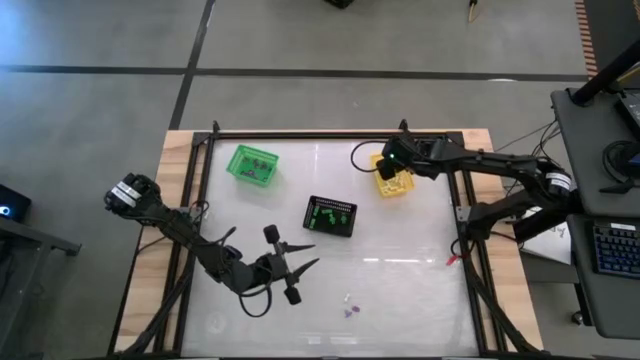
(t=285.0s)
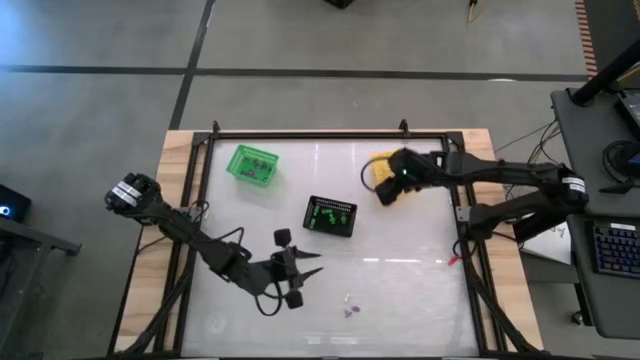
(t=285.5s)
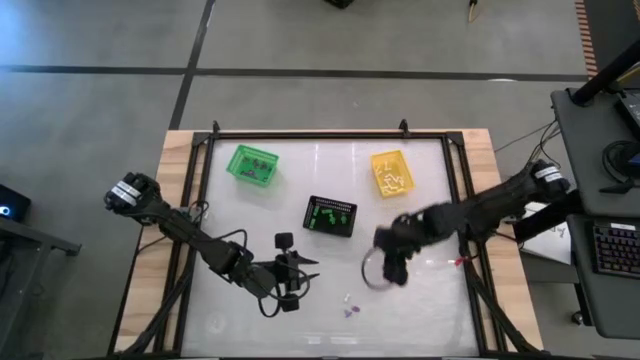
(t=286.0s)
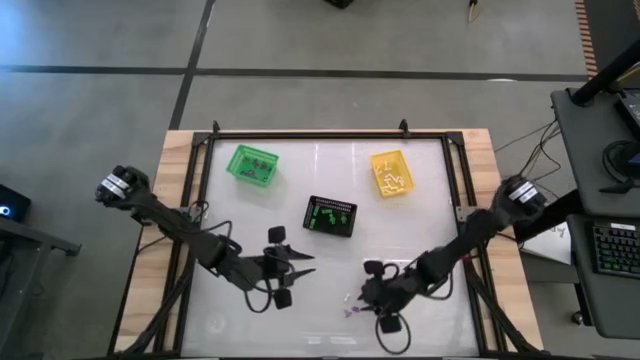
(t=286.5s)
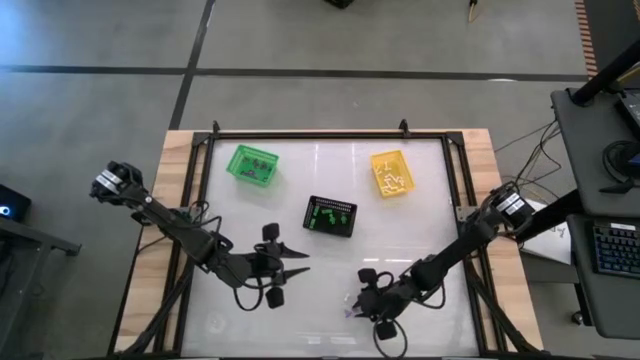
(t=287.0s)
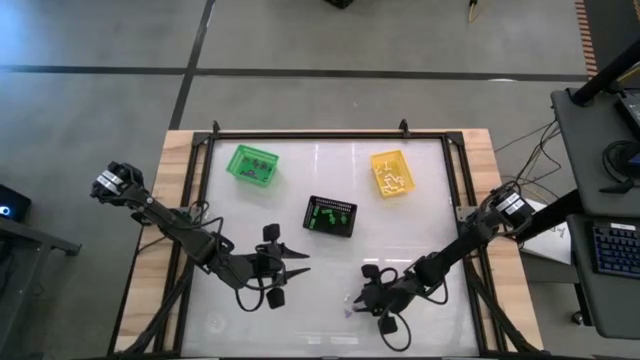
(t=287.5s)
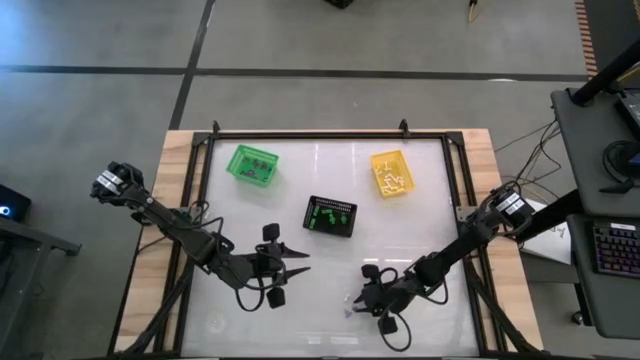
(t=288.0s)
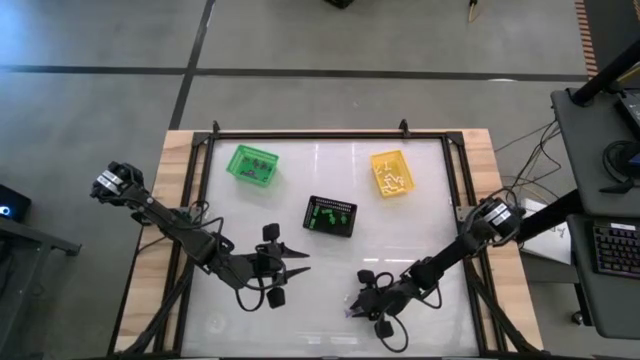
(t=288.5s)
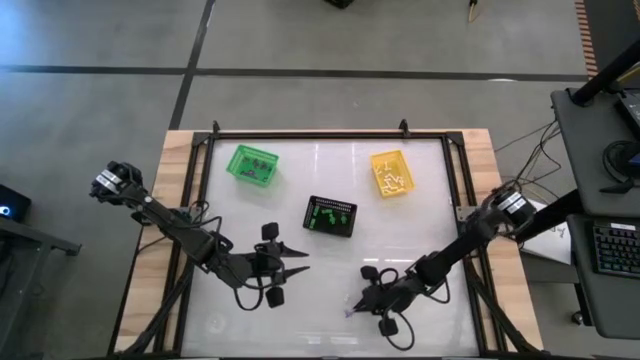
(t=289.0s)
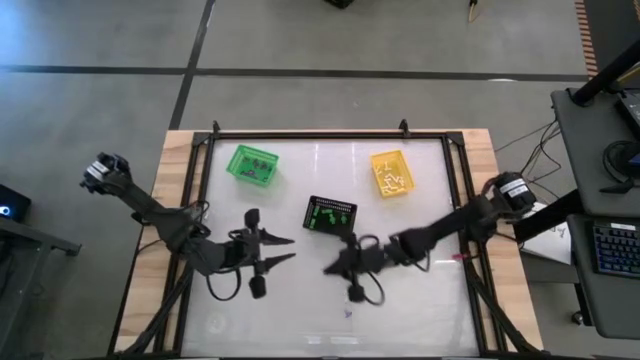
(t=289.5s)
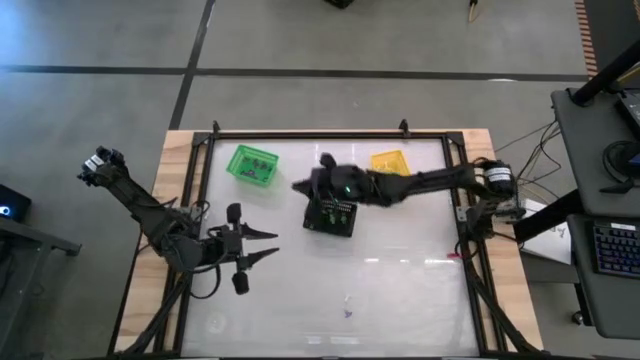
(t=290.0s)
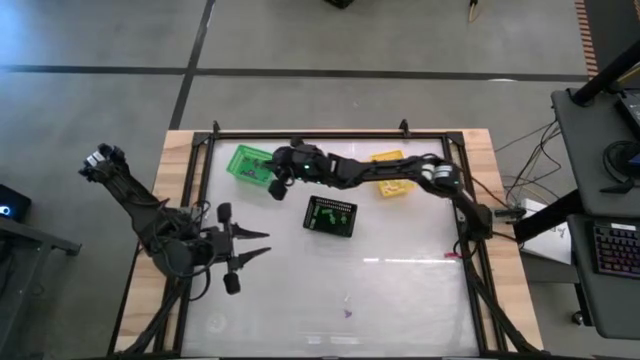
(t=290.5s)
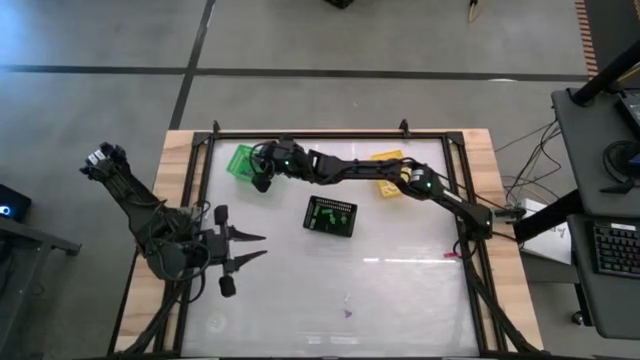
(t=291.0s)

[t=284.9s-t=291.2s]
Task: Sort Halloween decoration
Put the purple witch hat toy into the green bin

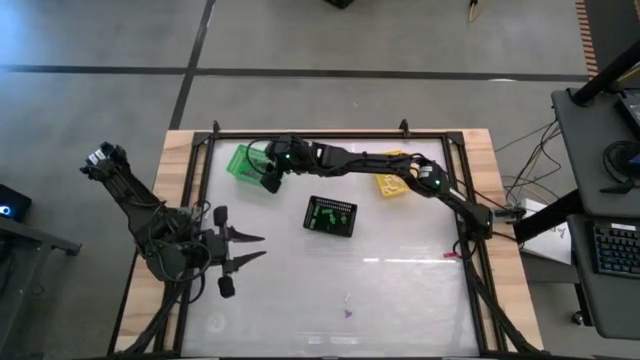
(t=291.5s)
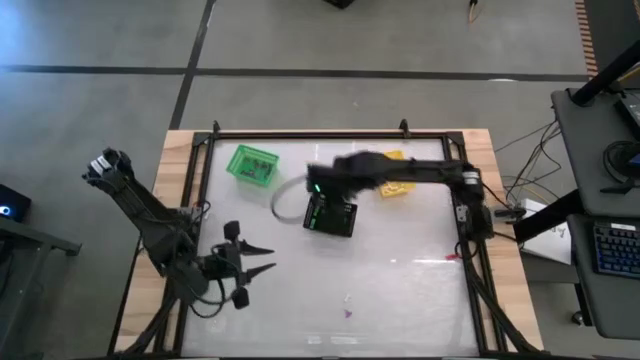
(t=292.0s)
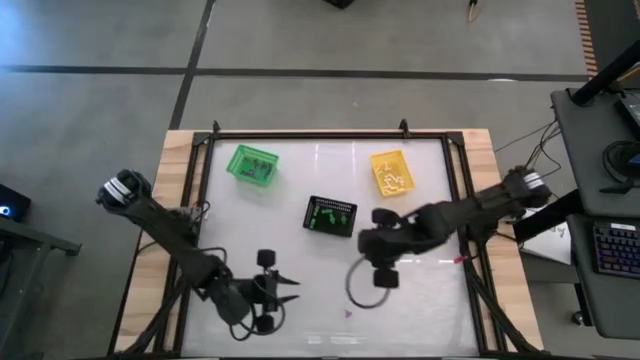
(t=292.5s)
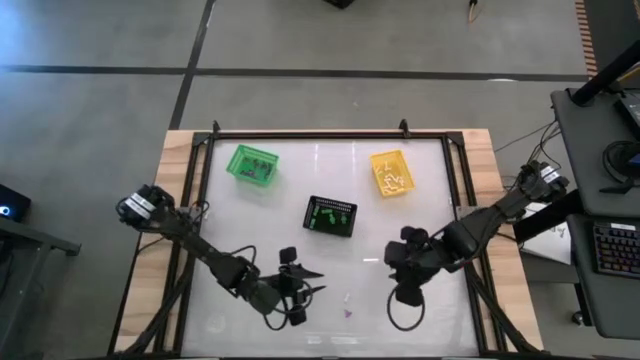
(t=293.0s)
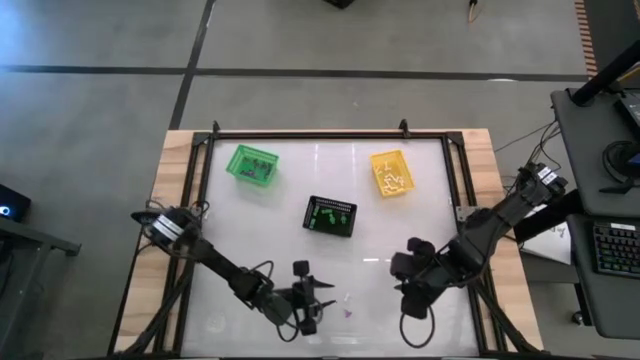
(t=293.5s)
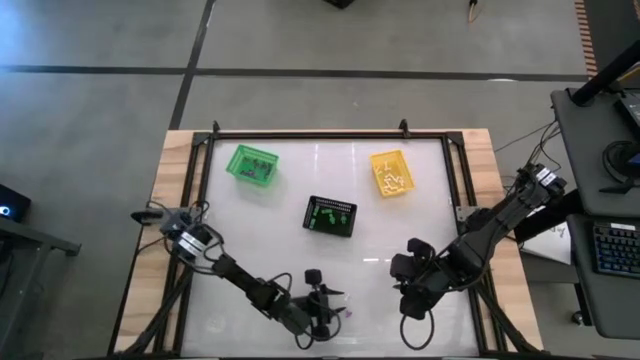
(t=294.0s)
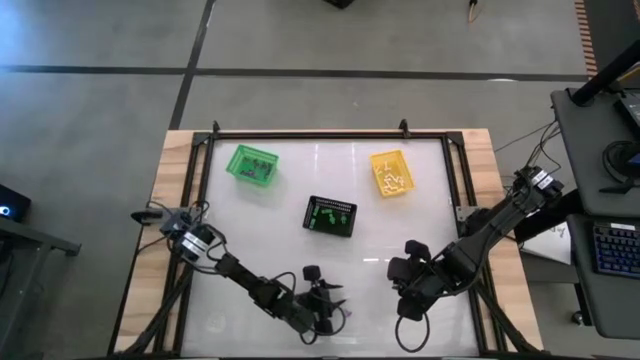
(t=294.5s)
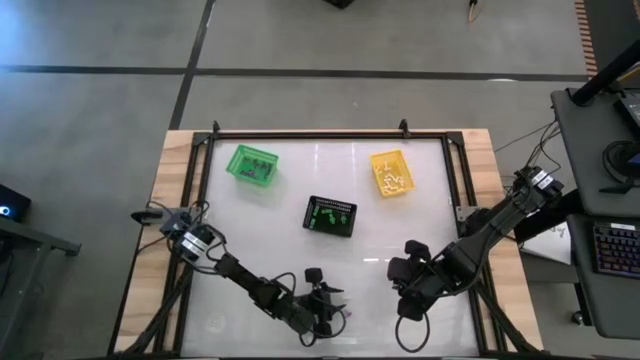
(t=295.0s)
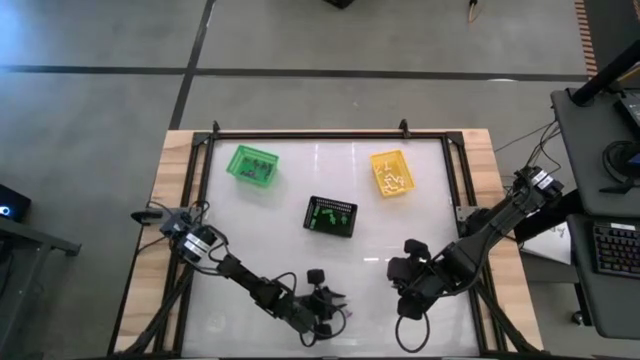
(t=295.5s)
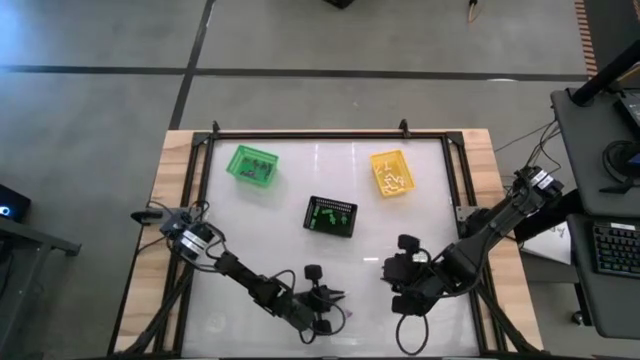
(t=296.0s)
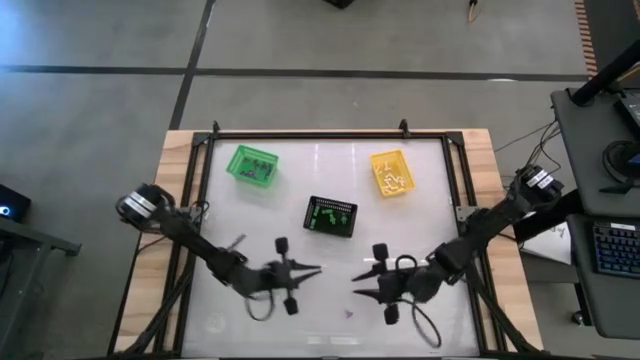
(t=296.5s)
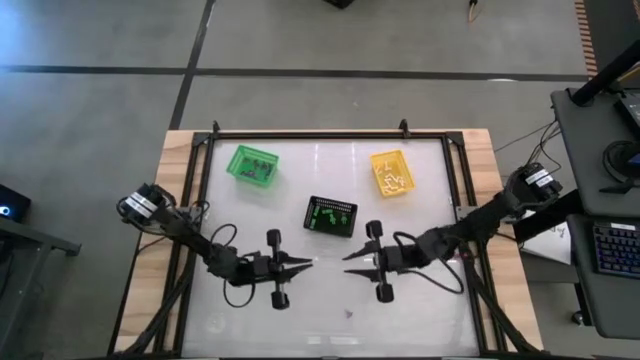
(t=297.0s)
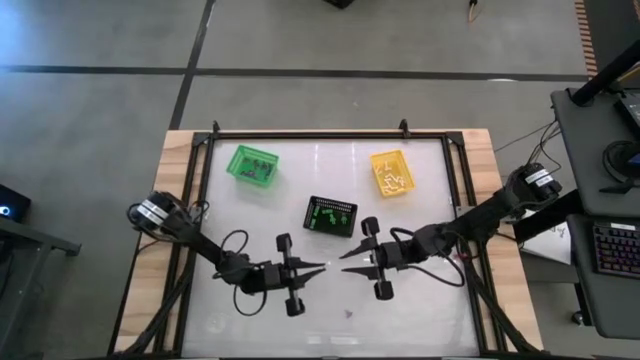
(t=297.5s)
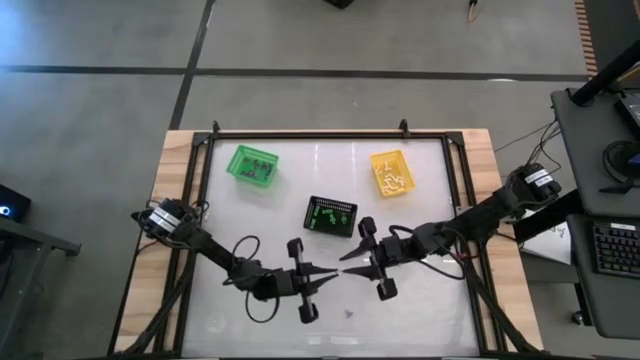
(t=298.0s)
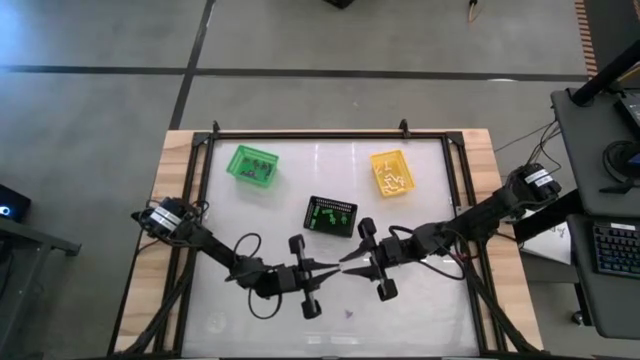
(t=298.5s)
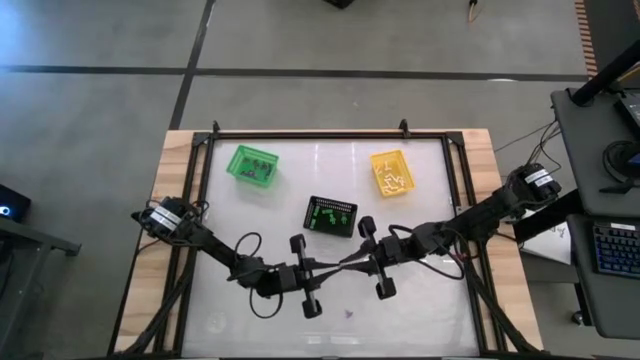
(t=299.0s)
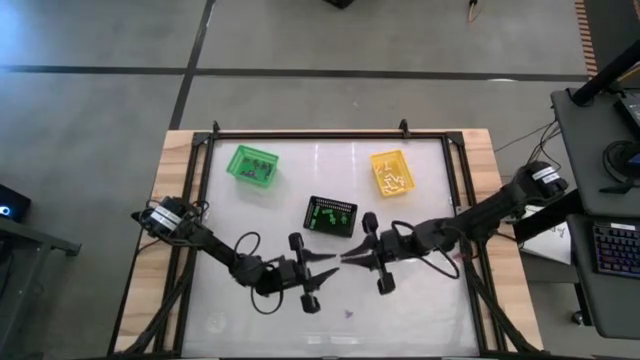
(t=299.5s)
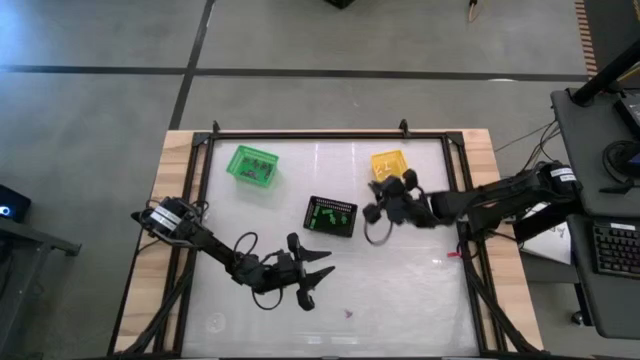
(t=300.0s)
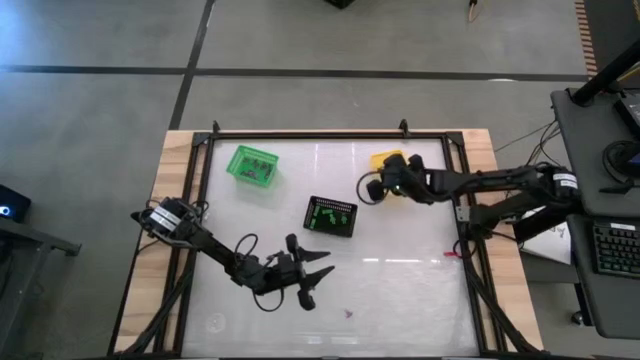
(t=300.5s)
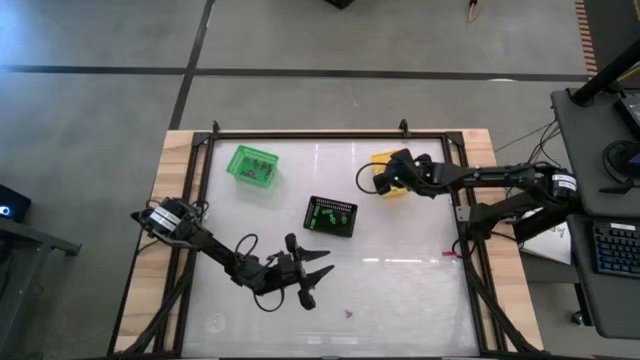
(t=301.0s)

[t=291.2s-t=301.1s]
Put the white bone toy into the yellow bin

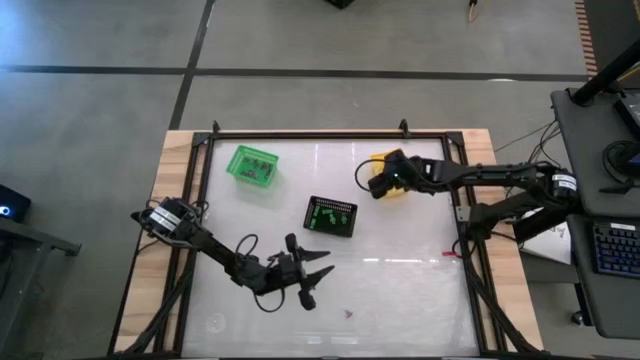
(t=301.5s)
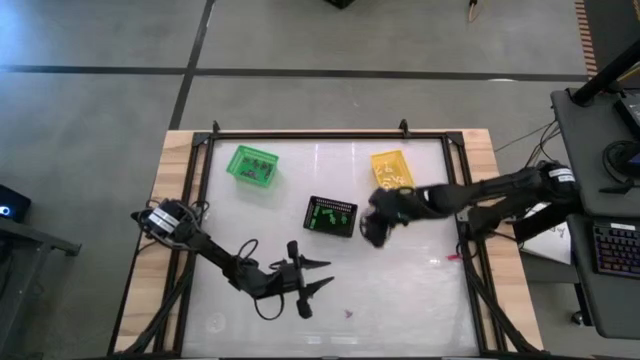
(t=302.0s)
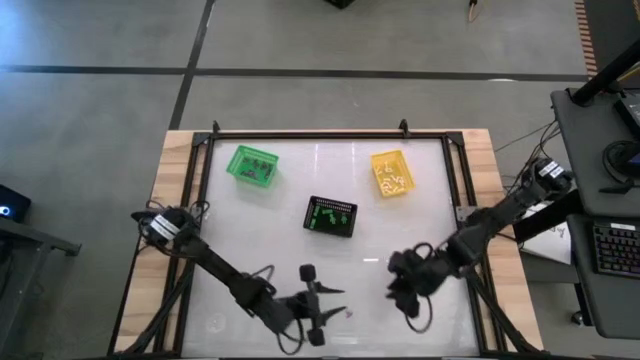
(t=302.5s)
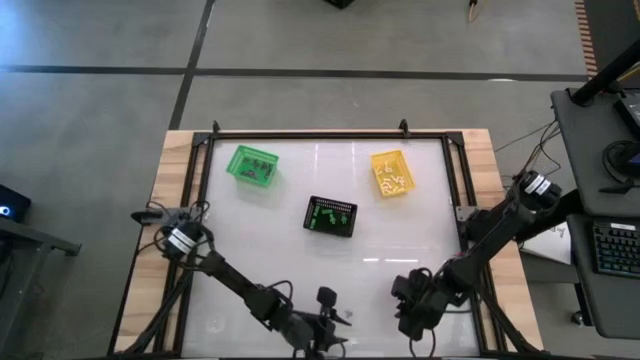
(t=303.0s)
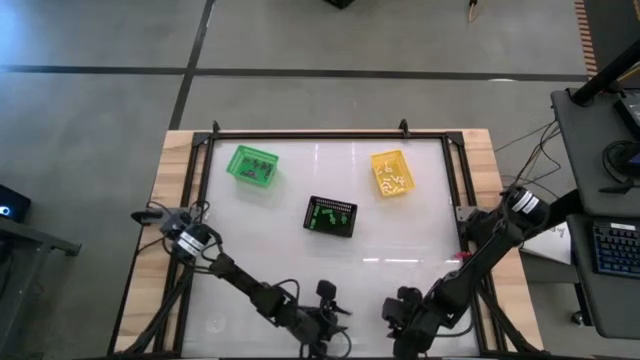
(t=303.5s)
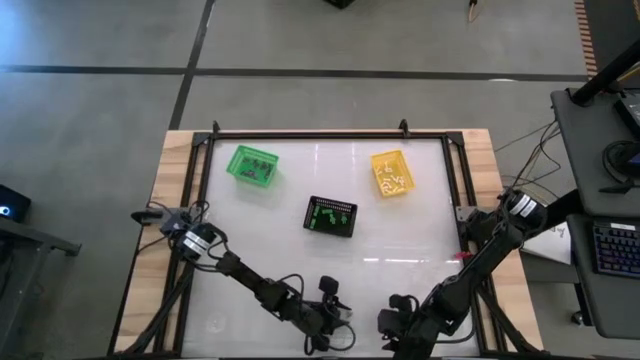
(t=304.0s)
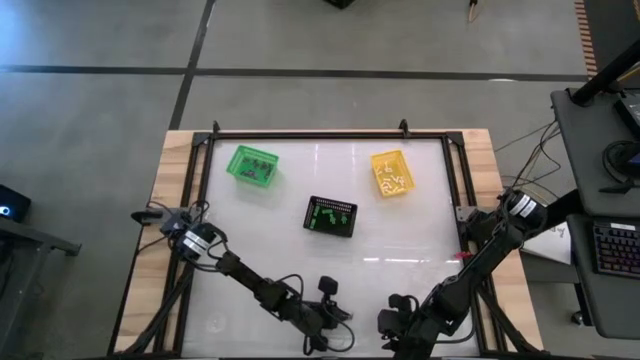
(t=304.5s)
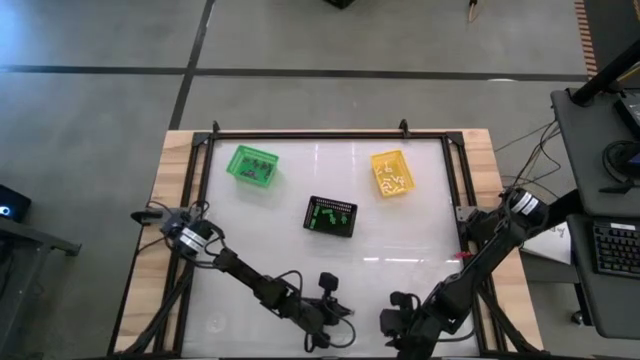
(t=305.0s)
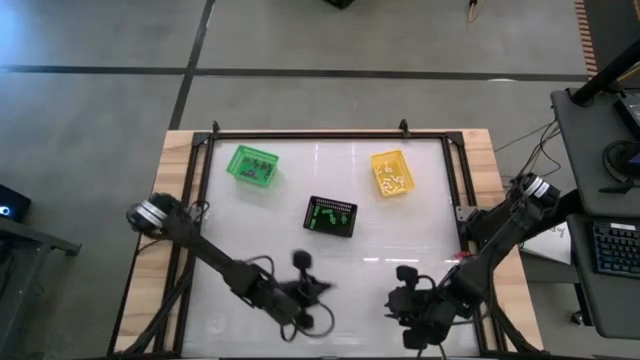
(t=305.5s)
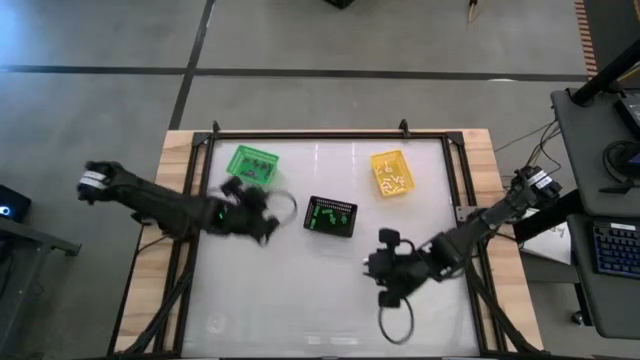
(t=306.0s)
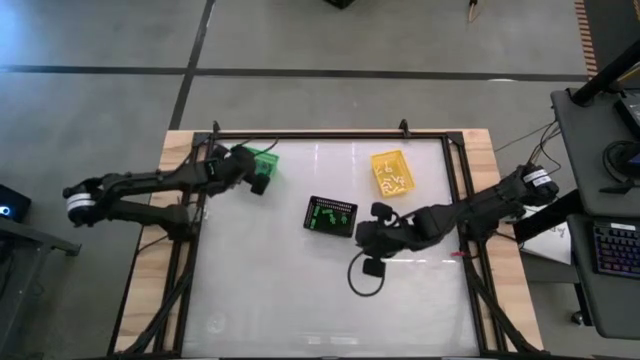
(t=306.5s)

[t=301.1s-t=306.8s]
Put the purple witch hat toy into the green bin
